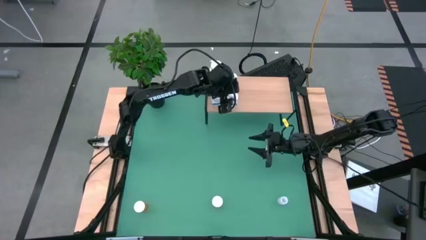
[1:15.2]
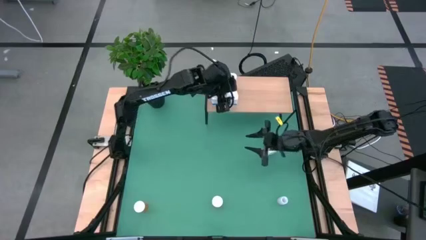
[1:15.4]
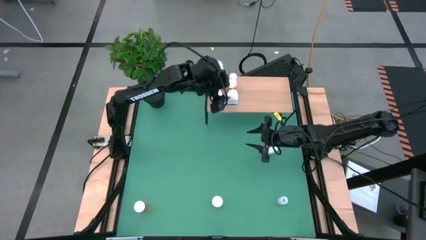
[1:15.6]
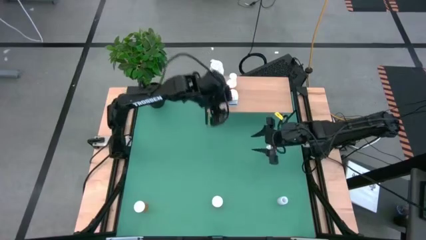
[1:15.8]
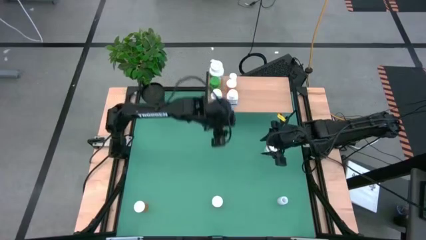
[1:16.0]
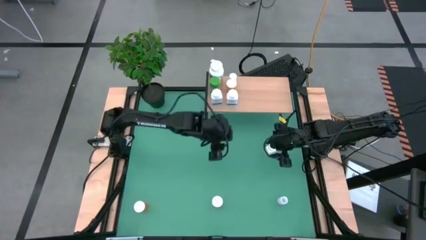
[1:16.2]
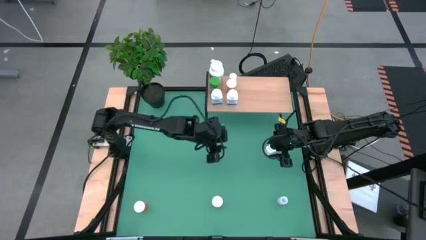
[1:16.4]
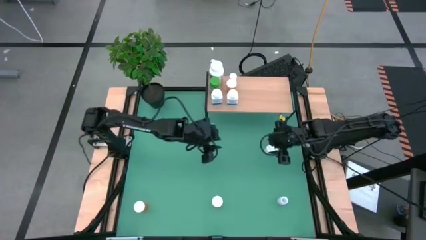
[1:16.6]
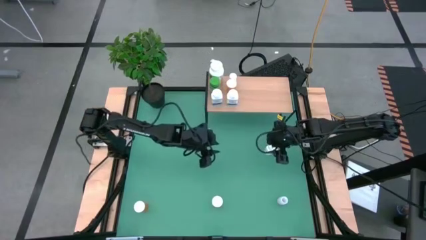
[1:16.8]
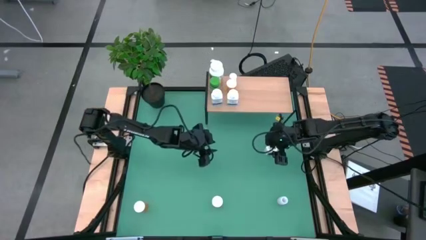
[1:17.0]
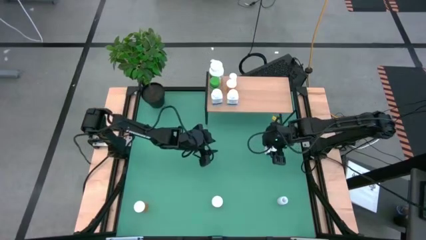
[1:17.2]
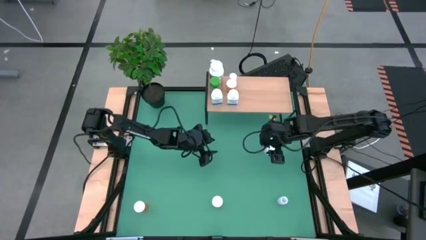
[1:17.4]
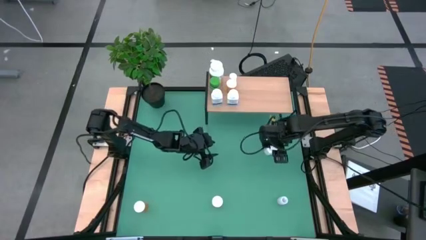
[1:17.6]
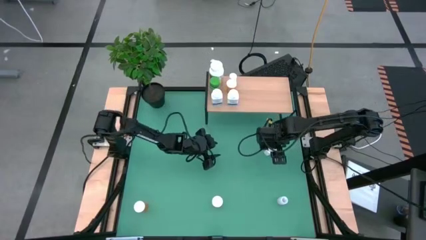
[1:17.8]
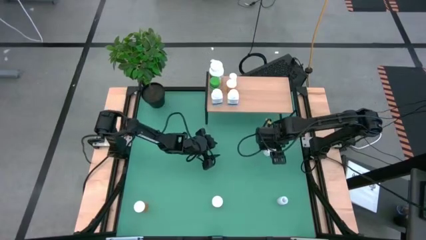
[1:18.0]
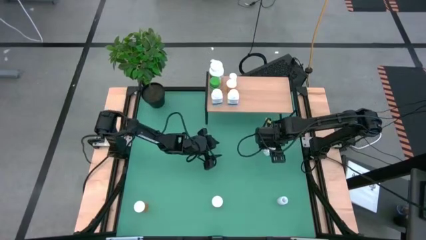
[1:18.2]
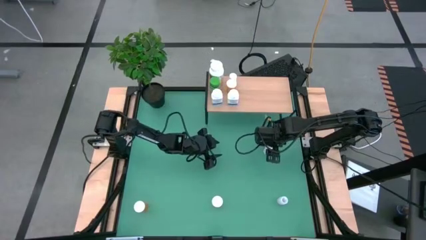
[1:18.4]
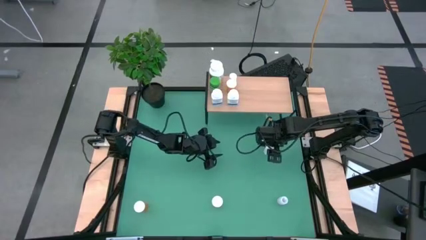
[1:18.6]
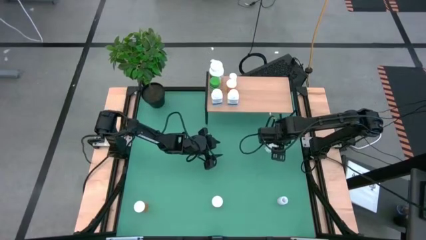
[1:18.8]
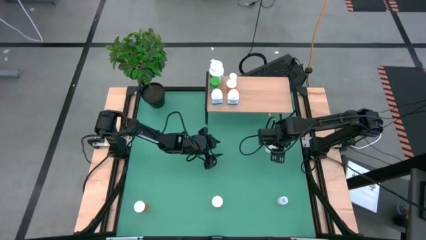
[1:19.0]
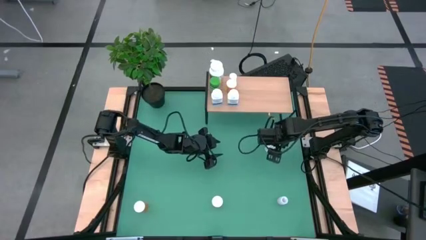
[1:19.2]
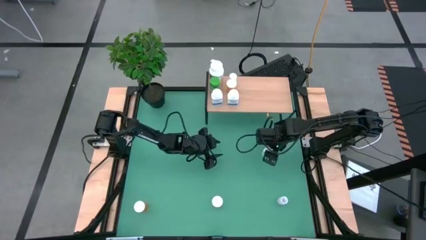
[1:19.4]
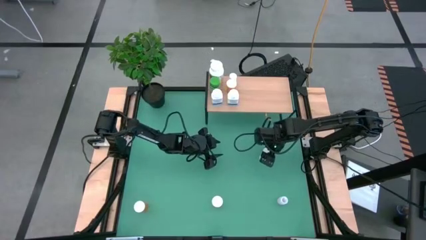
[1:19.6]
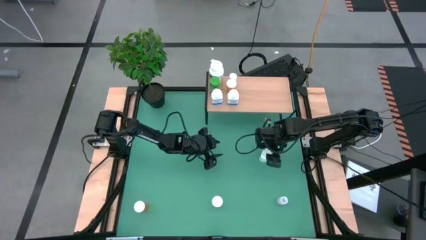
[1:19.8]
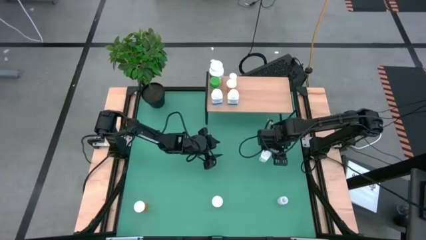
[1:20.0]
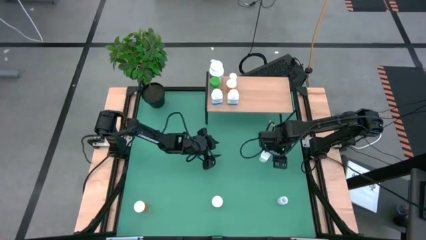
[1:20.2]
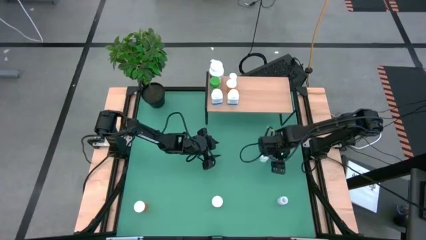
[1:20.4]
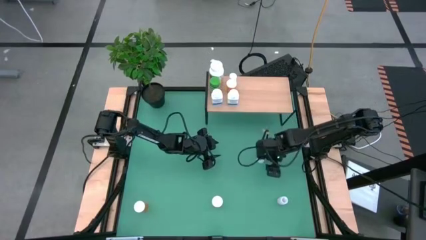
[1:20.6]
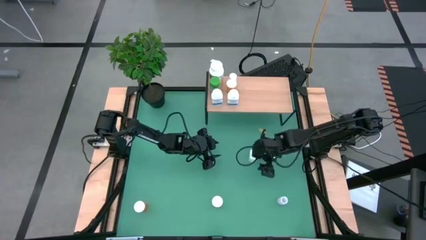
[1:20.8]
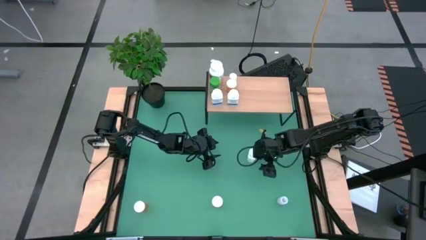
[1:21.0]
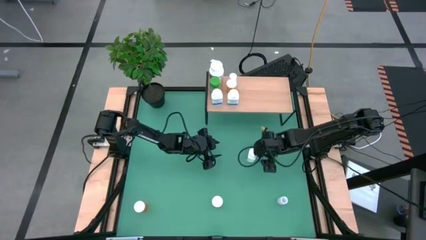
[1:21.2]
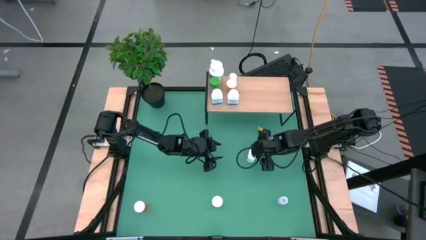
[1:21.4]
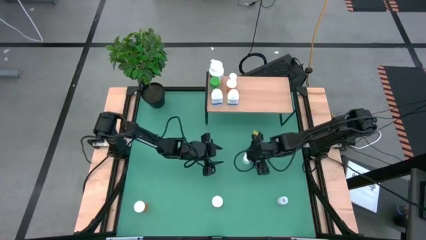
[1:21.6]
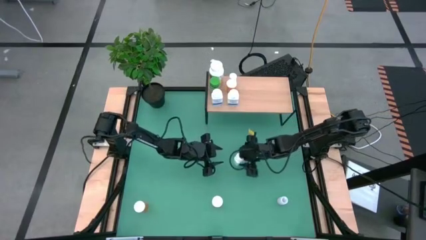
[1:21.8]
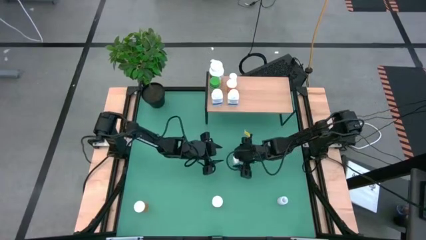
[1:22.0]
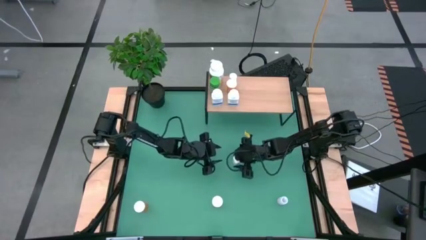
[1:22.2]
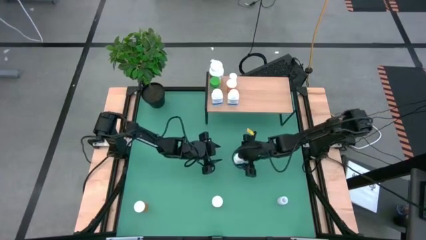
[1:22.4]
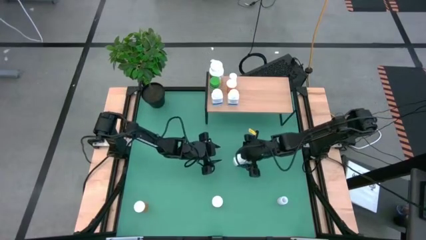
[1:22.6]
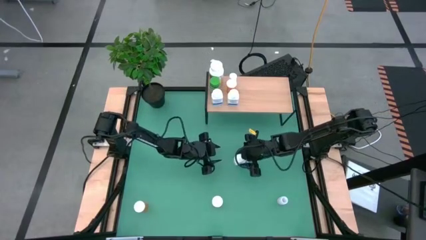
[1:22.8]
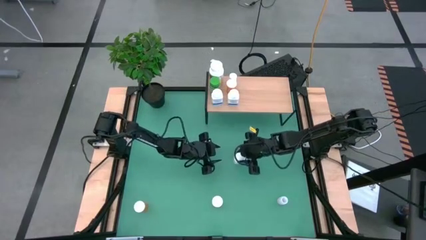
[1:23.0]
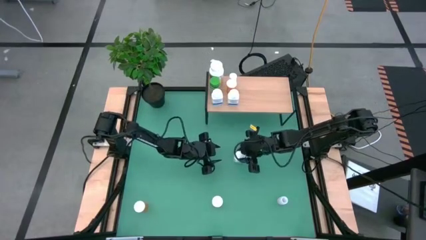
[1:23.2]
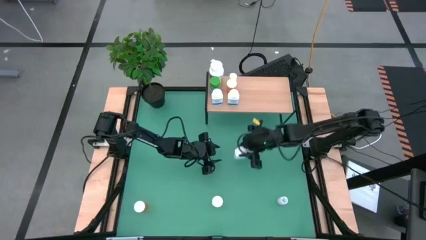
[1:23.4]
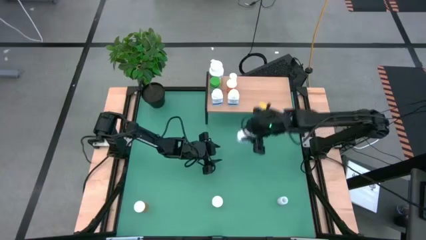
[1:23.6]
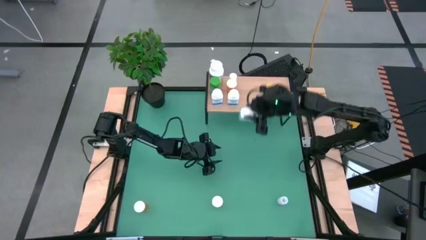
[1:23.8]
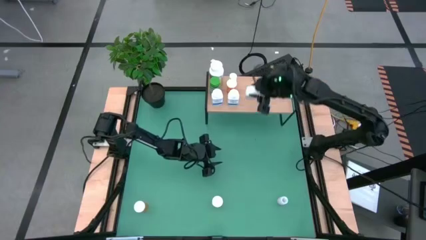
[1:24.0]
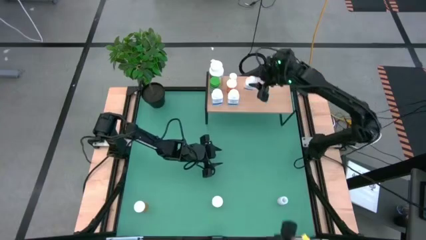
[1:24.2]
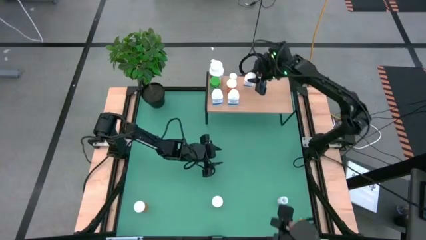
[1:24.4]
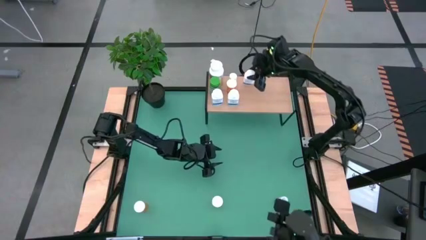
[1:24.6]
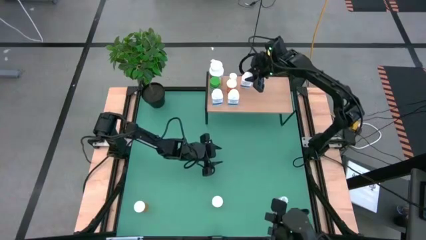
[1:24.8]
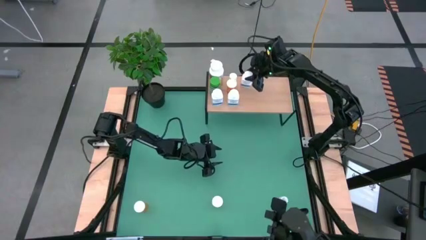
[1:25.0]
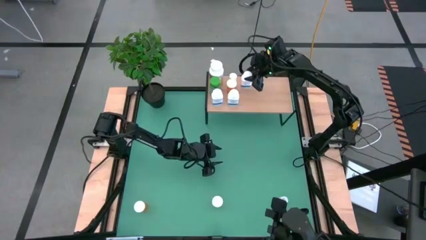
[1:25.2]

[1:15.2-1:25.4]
Task: Pick and place medicine bottles onto shelf by color
Put the white blue medicine bottle on the shelf

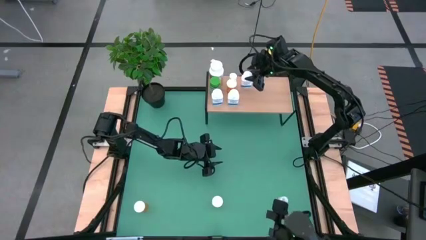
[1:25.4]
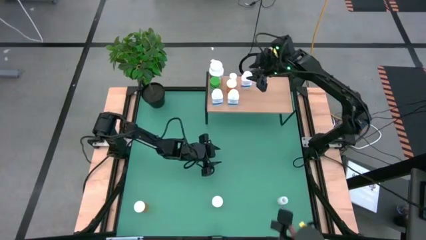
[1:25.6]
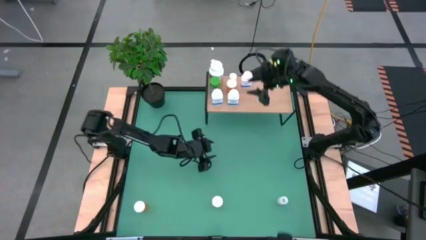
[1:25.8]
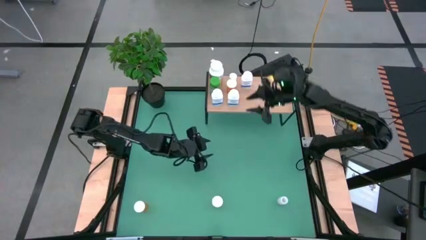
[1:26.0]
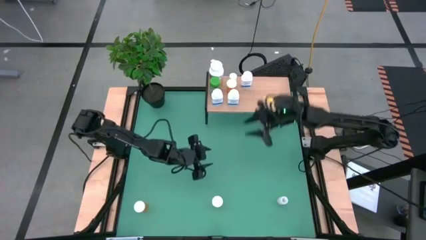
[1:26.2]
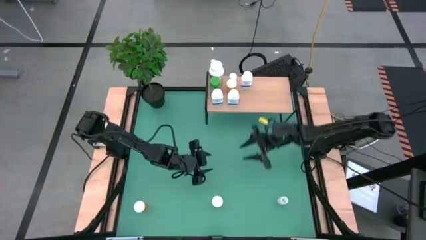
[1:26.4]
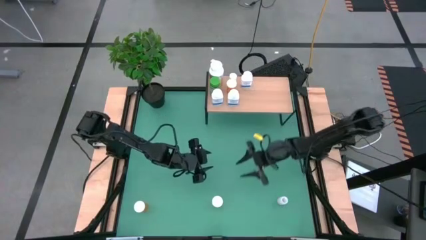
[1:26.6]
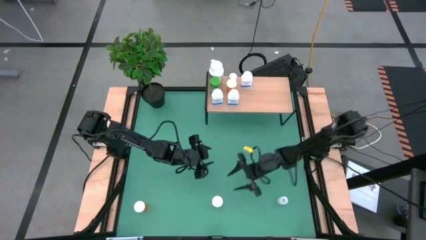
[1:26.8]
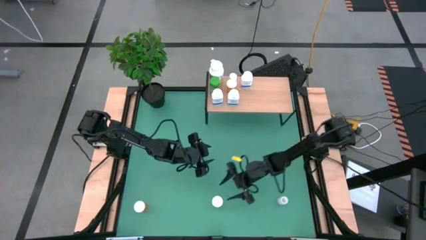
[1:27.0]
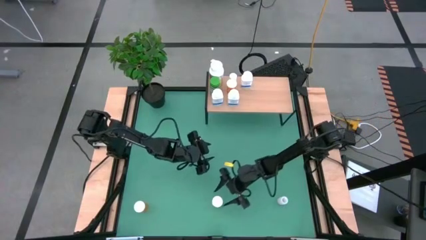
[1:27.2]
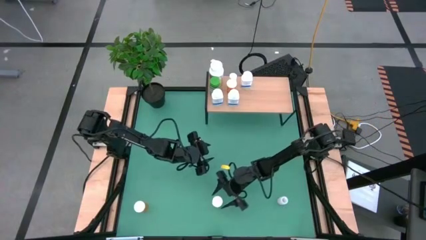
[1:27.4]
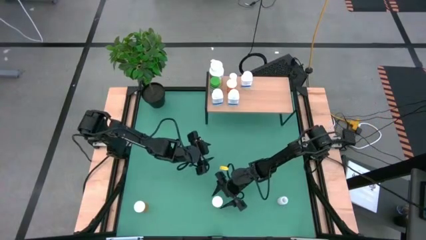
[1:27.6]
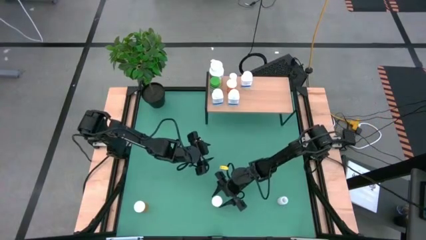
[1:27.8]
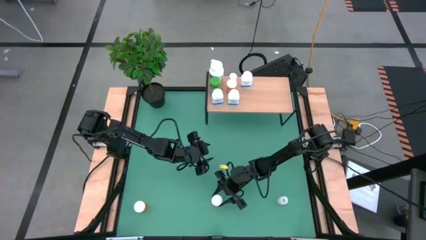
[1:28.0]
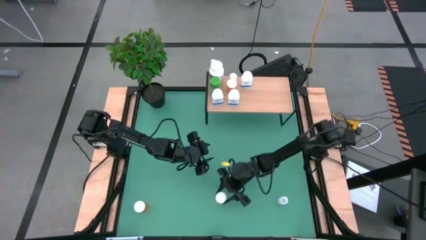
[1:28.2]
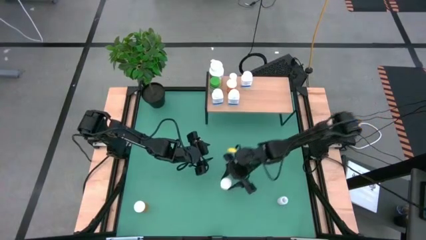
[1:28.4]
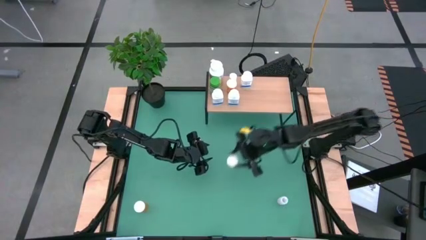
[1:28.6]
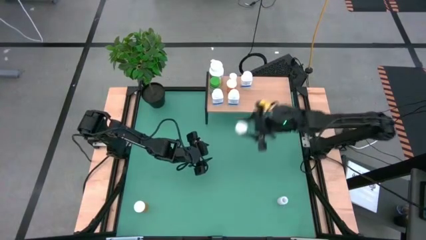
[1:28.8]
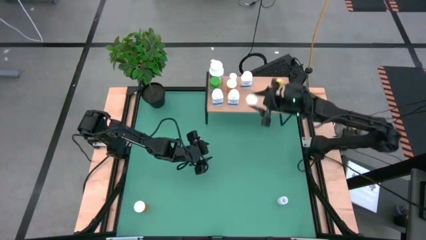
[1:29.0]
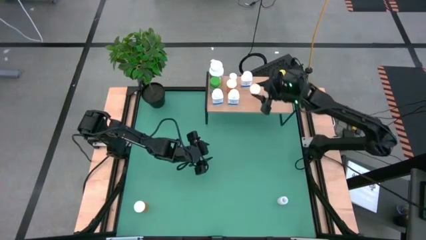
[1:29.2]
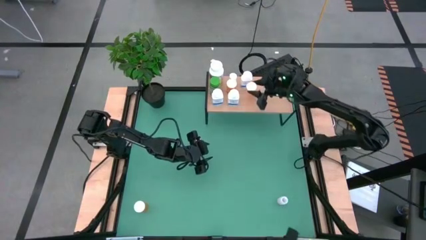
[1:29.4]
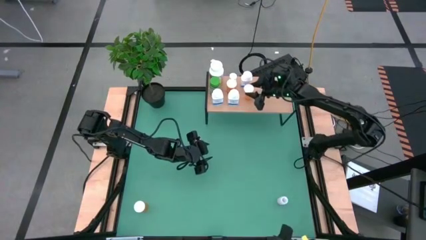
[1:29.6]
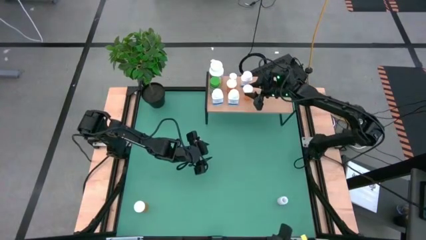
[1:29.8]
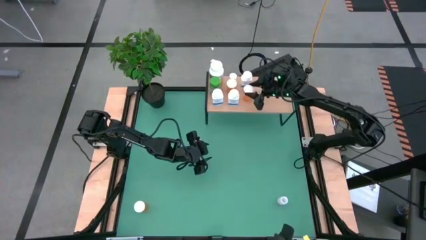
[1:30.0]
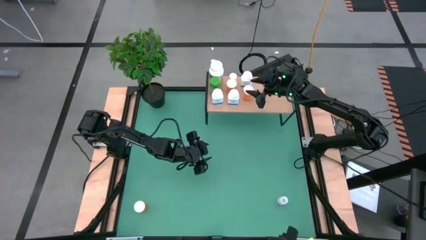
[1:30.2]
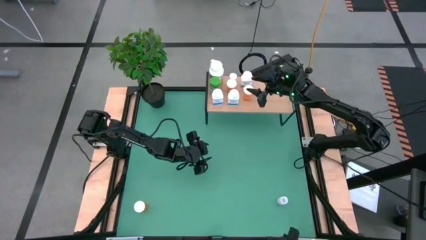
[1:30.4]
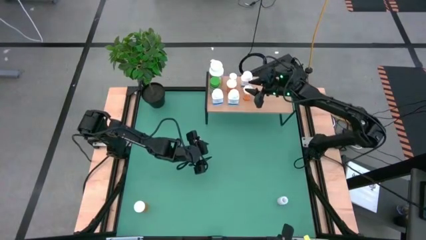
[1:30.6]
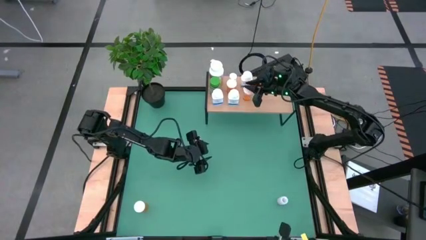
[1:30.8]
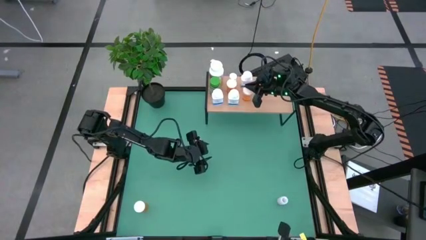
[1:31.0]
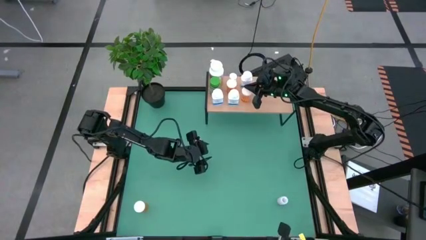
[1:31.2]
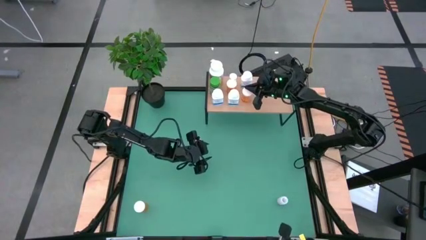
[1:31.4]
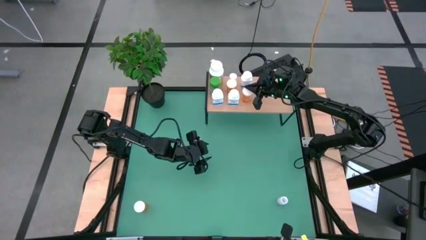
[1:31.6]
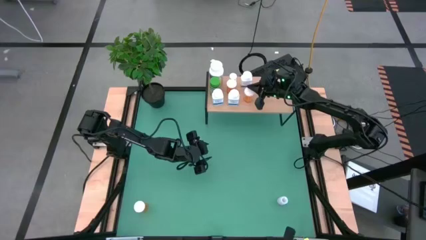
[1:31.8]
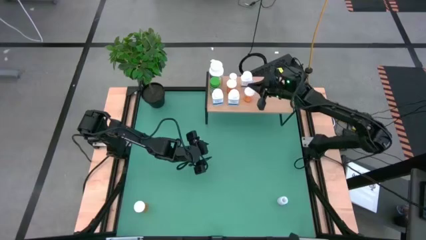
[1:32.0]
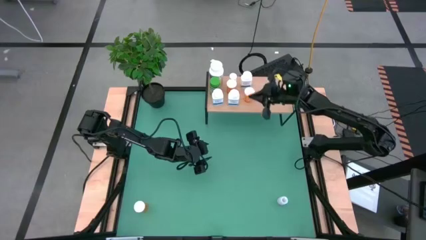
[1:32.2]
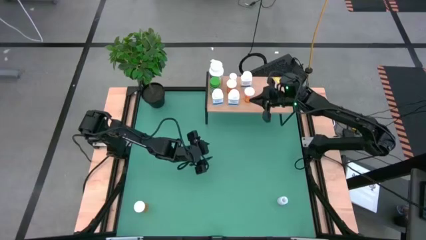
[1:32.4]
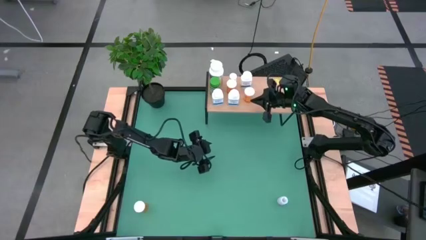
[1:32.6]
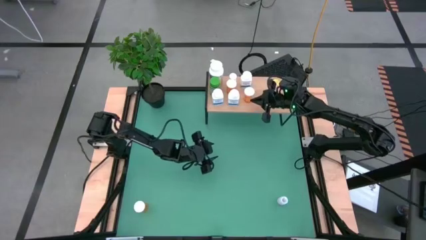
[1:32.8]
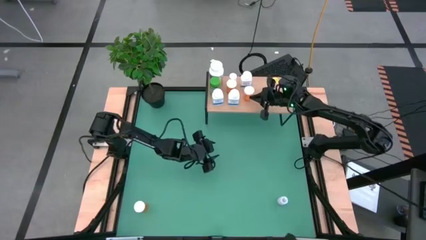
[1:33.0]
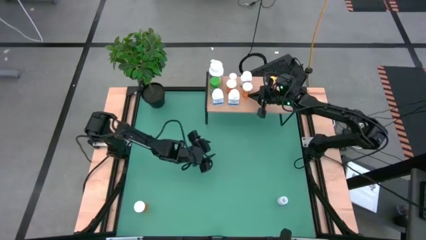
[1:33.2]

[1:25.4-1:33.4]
Put the right orange medicine bottle on the shelf
